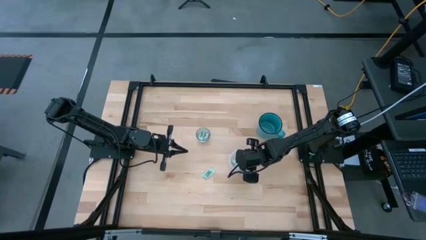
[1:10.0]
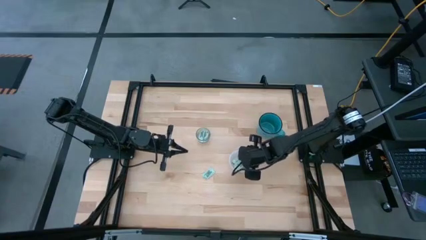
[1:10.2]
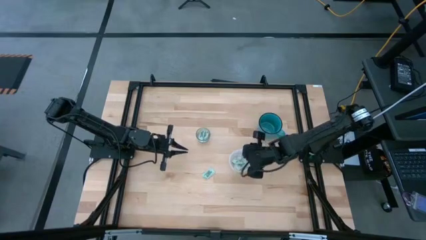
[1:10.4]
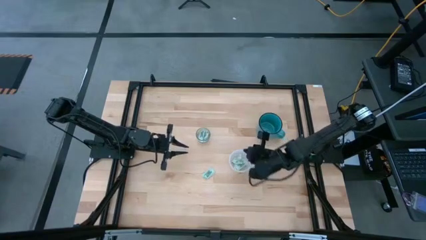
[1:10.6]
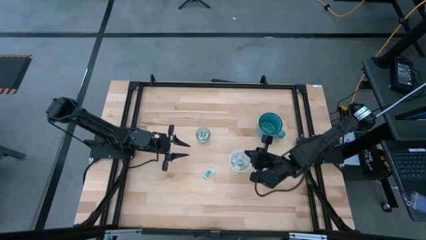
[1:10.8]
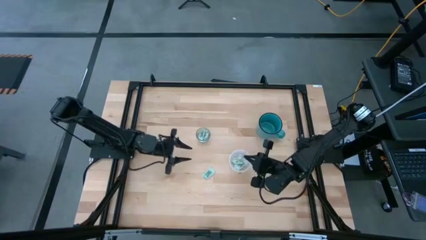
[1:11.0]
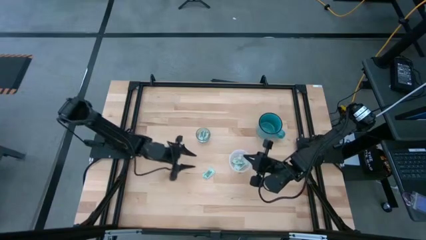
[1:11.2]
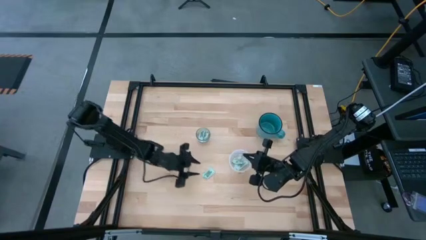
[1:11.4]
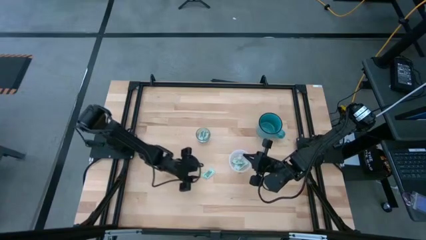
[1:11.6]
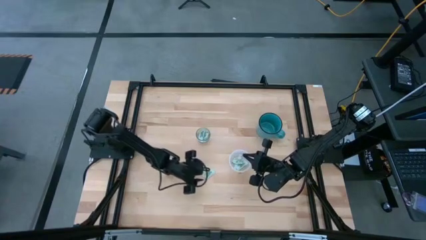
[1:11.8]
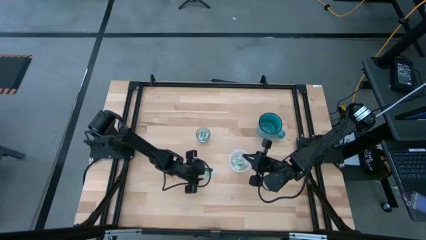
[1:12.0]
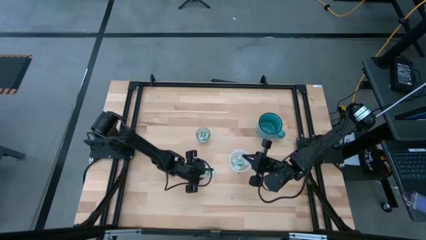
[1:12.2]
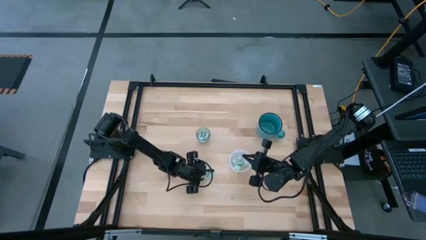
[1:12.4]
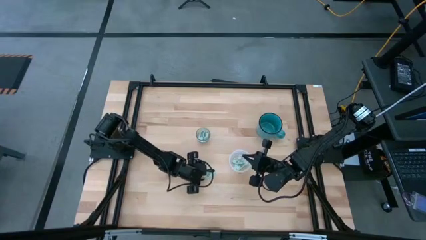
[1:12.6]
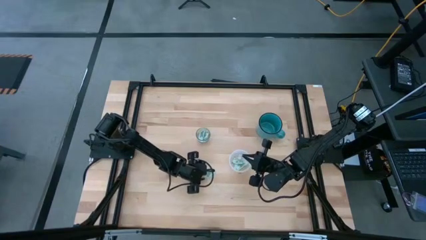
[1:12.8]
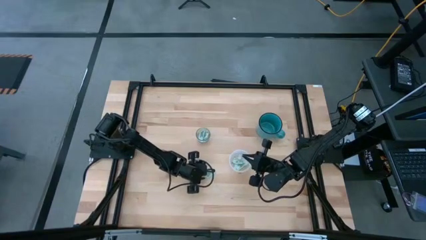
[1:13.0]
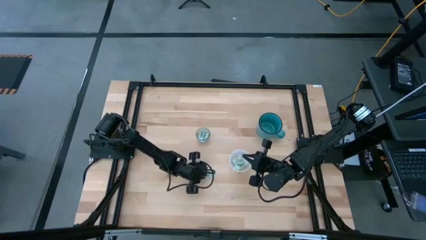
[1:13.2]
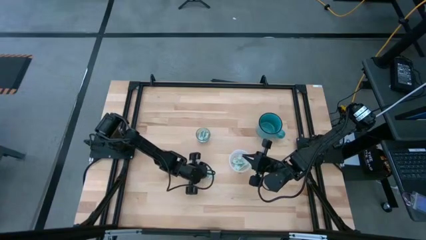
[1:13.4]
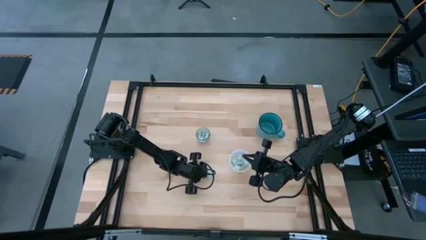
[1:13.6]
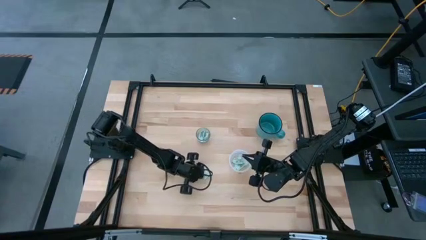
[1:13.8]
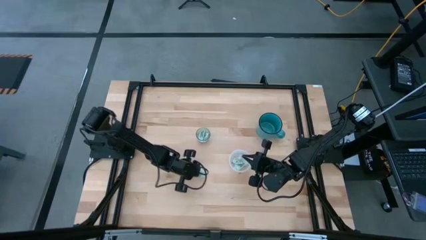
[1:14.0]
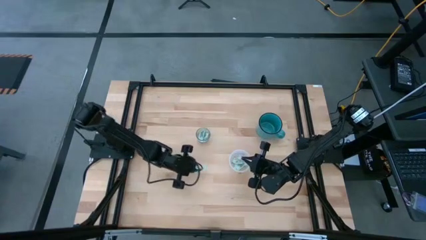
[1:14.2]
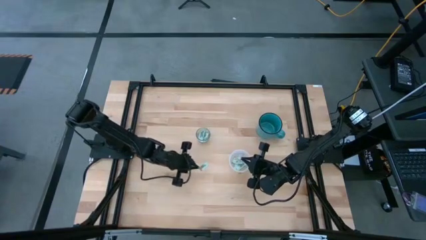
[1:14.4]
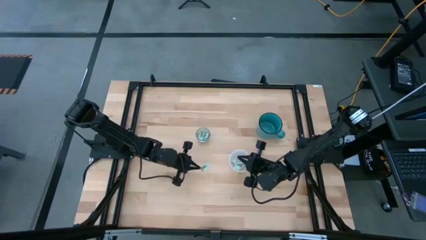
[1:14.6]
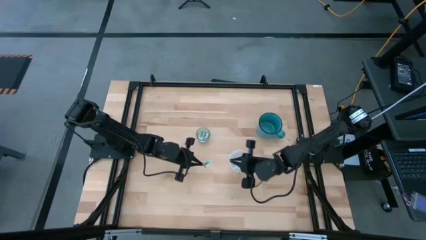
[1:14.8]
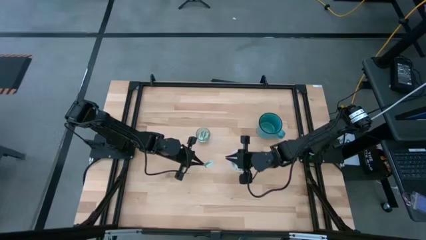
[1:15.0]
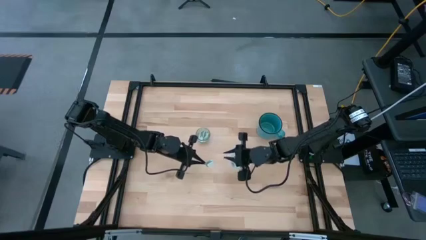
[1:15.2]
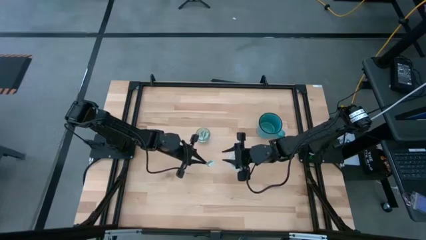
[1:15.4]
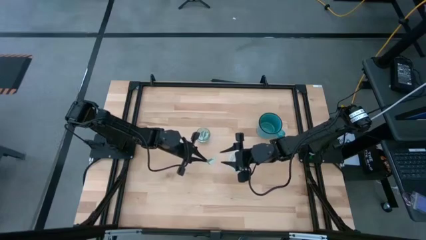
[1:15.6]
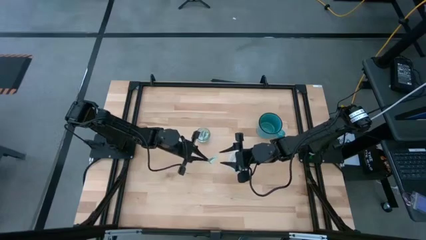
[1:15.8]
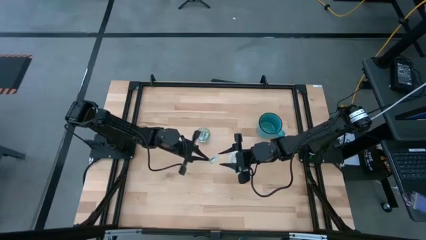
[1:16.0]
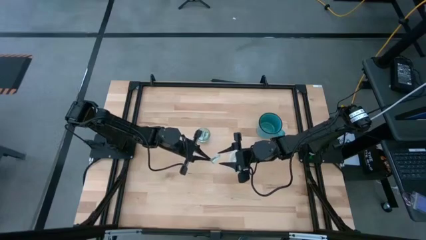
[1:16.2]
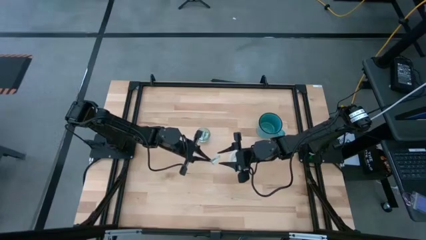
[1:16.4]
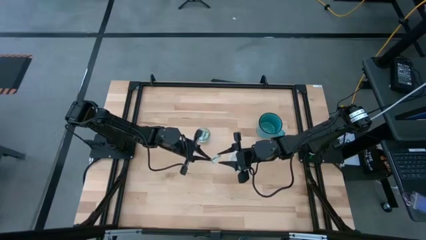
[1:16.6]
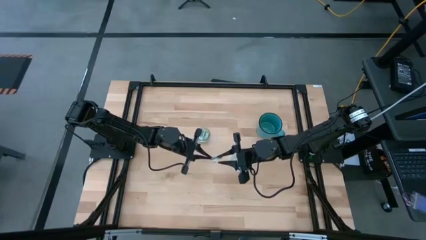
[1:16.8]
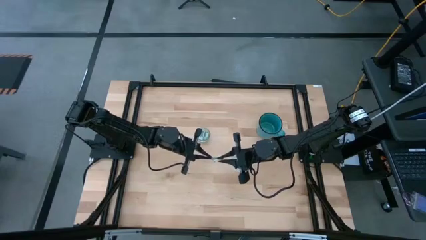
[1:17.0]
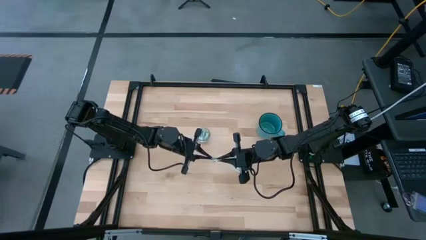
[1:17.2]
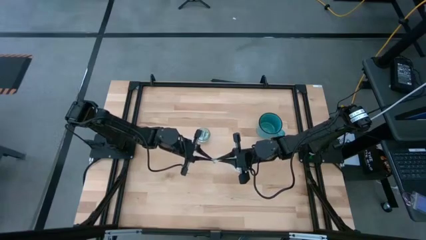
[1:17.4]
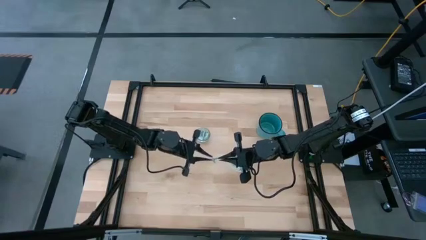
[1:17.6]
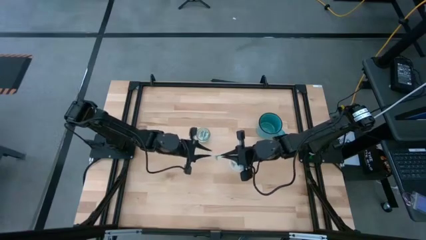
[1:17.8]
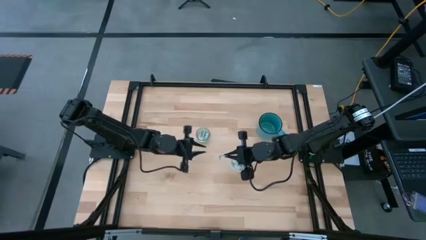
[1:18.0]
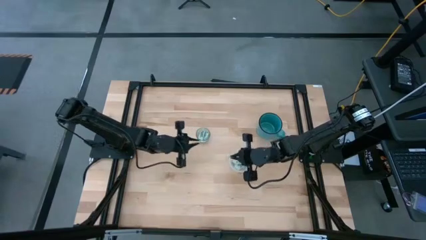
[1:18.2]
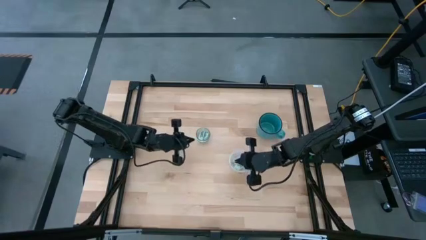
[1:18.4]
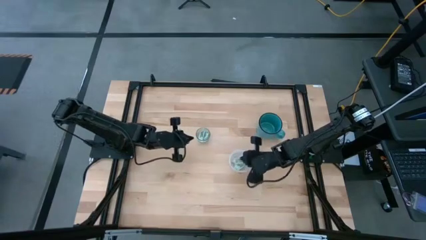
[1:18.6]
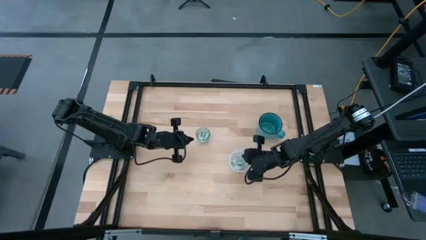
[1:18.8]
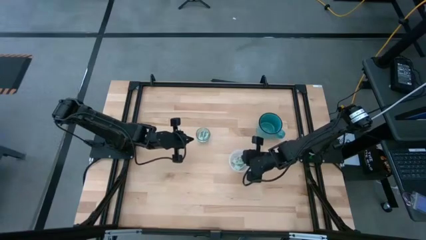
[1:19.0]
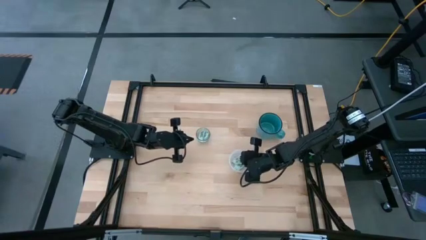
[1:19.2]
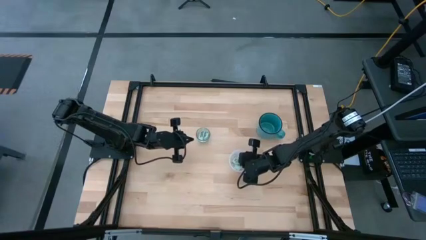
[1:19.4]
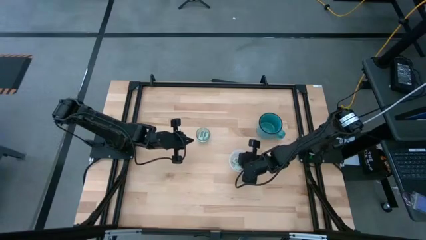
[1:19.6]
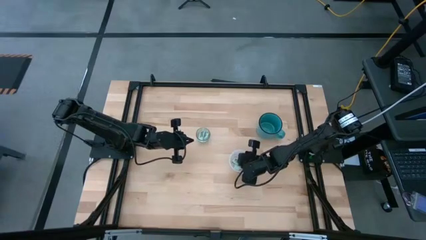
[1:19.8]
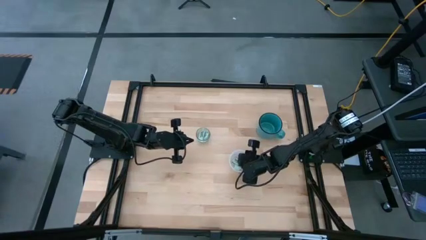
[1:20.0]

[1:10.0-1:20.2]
Task: Pick and place Stevia / Truvia into bins
Put the stevia packet into the transparent container
